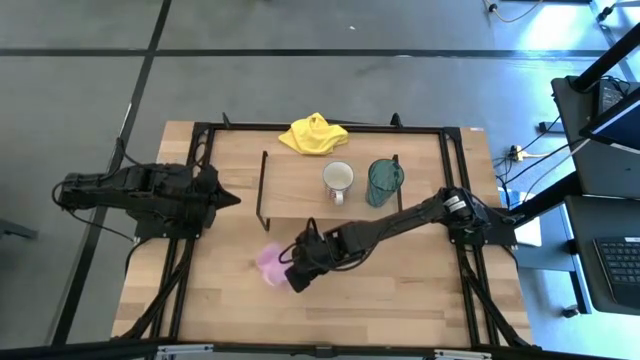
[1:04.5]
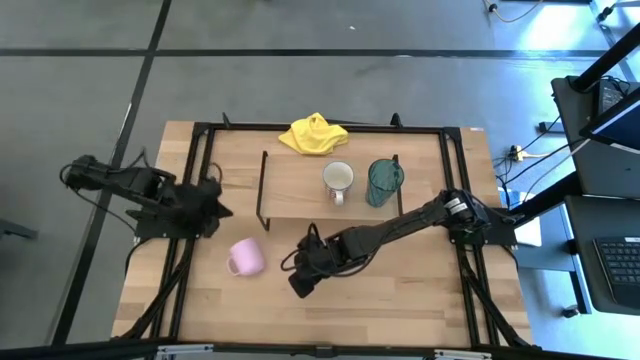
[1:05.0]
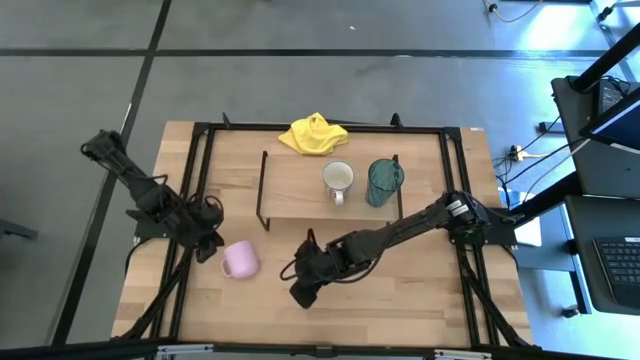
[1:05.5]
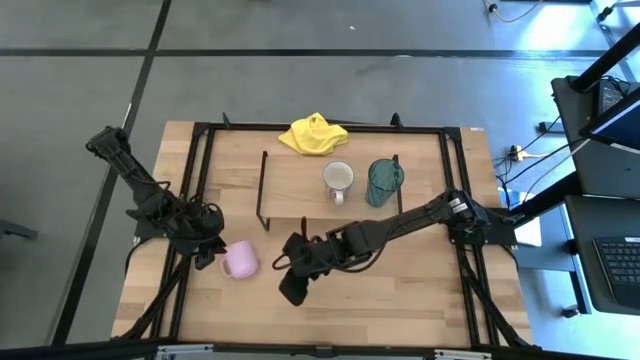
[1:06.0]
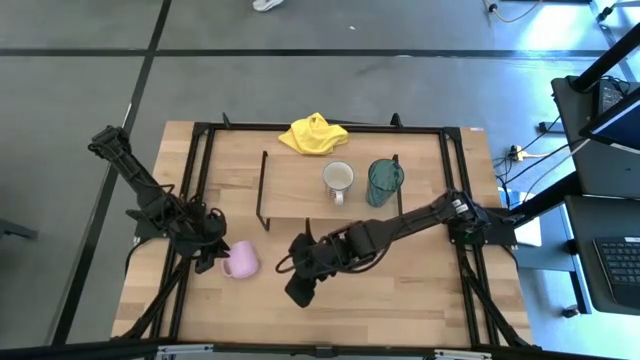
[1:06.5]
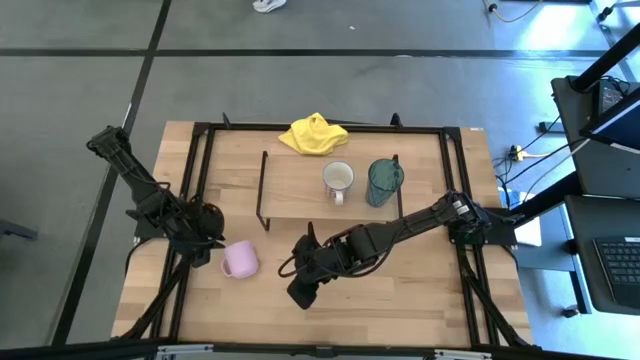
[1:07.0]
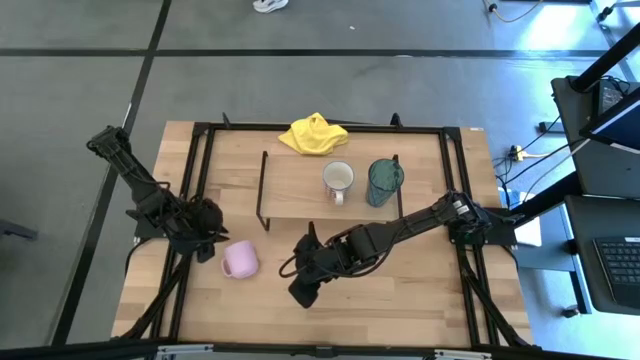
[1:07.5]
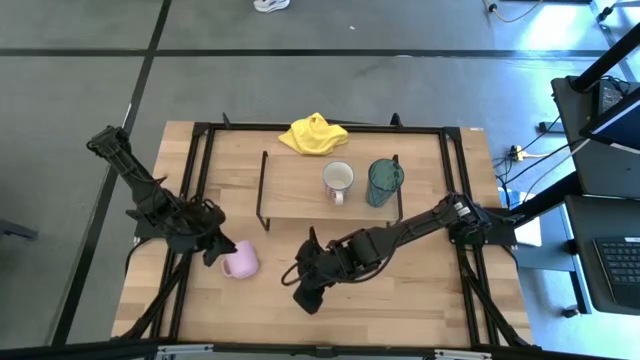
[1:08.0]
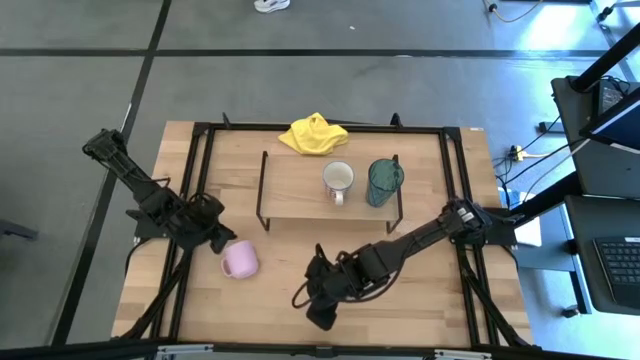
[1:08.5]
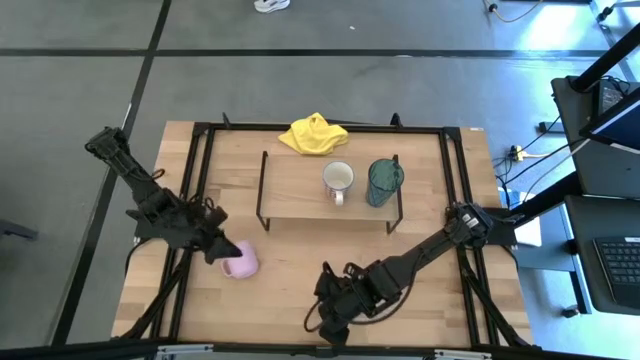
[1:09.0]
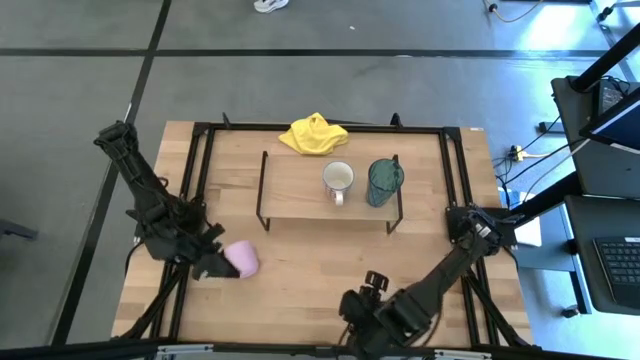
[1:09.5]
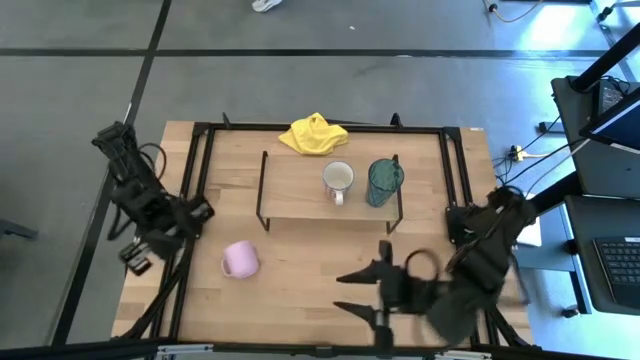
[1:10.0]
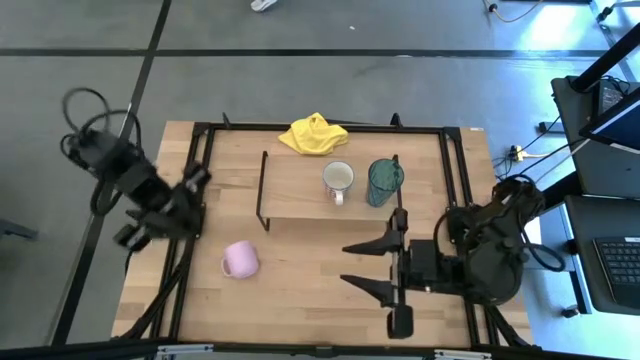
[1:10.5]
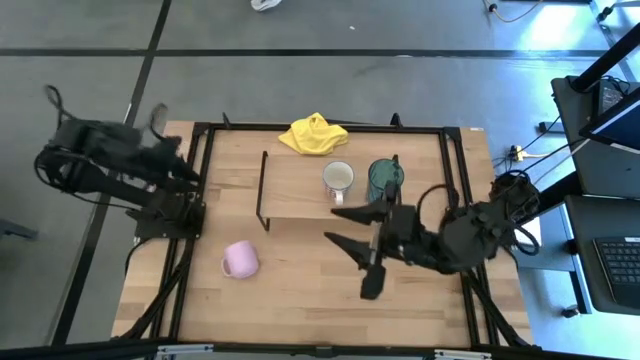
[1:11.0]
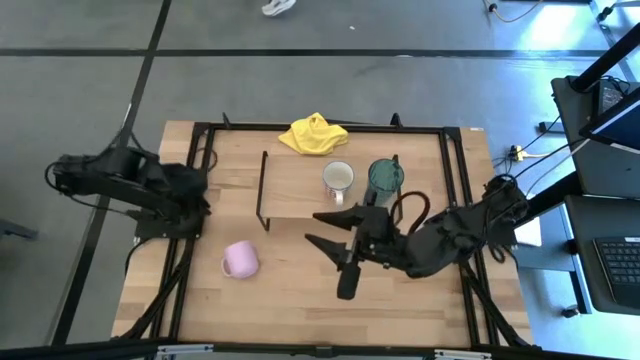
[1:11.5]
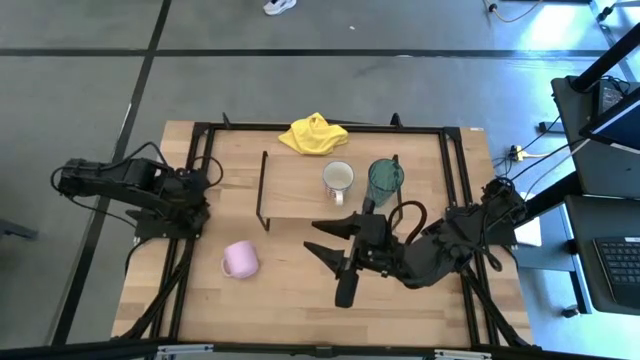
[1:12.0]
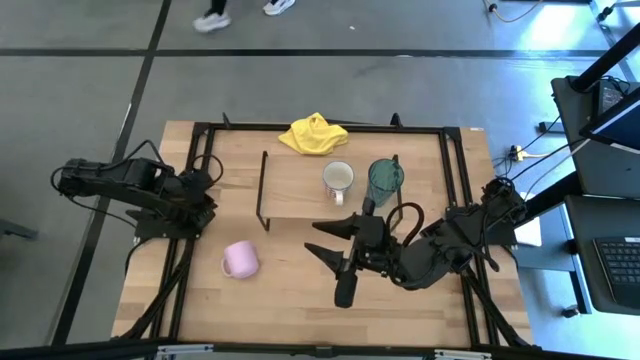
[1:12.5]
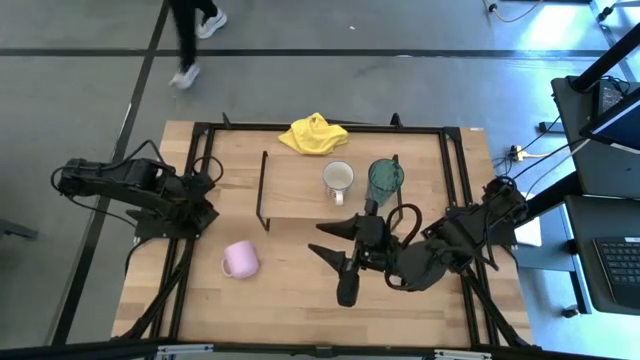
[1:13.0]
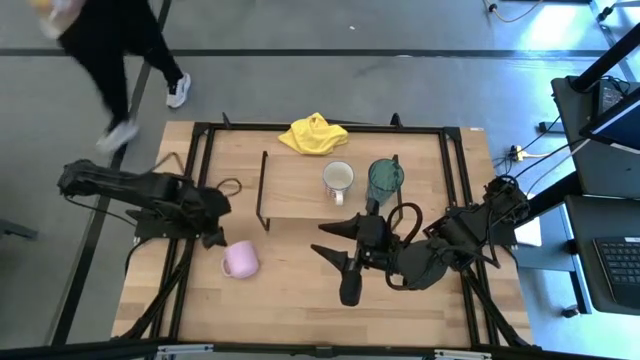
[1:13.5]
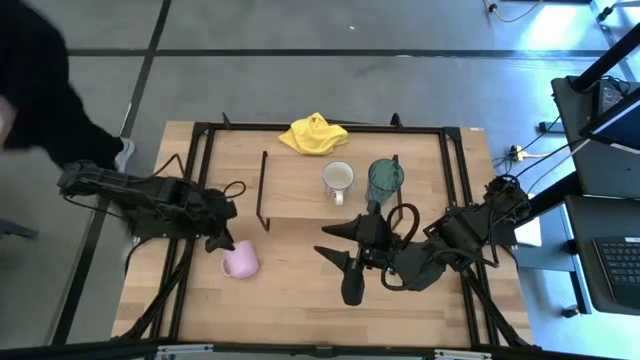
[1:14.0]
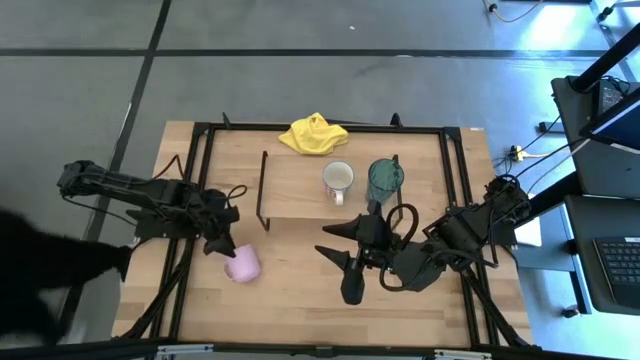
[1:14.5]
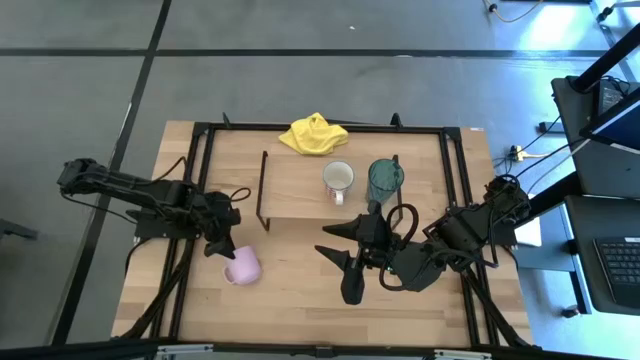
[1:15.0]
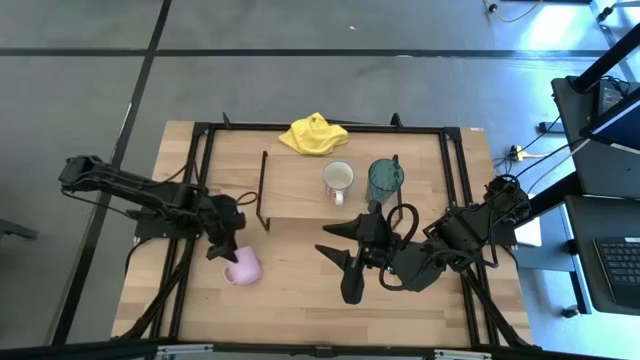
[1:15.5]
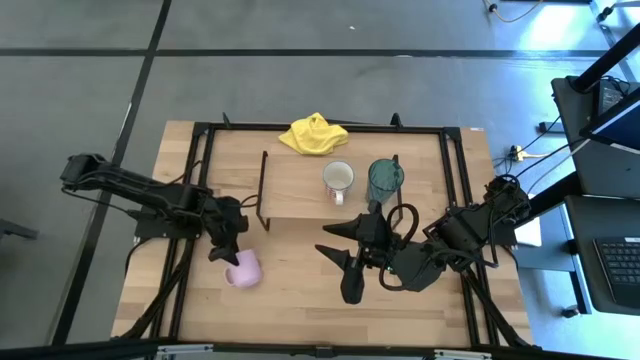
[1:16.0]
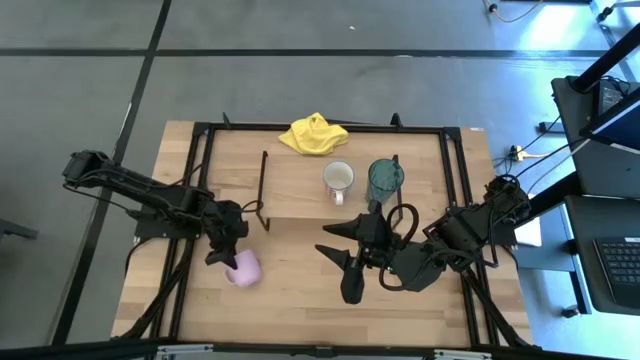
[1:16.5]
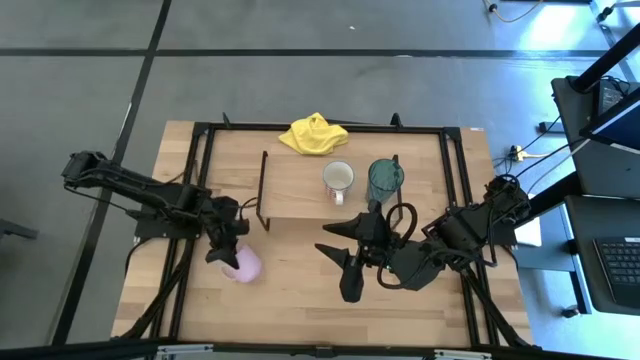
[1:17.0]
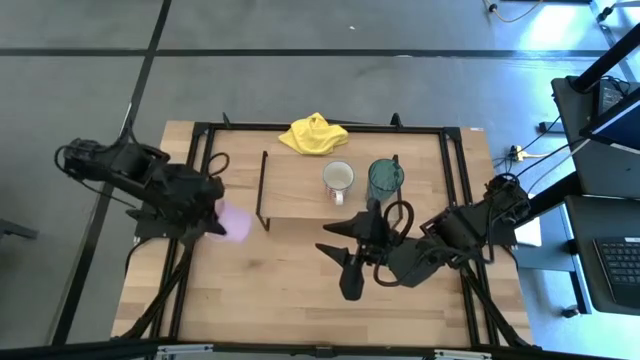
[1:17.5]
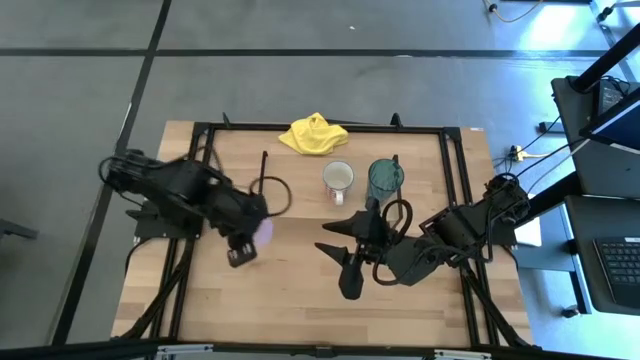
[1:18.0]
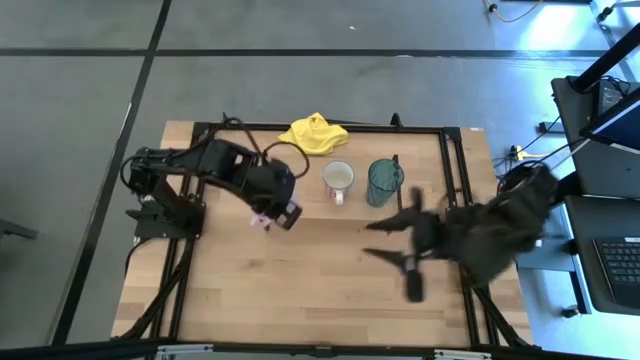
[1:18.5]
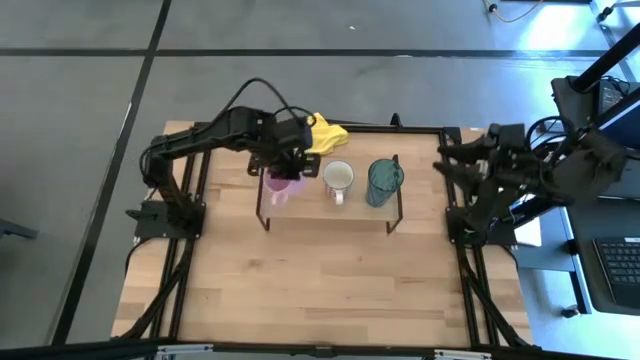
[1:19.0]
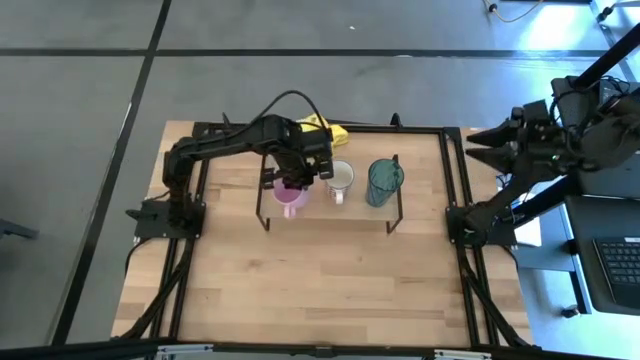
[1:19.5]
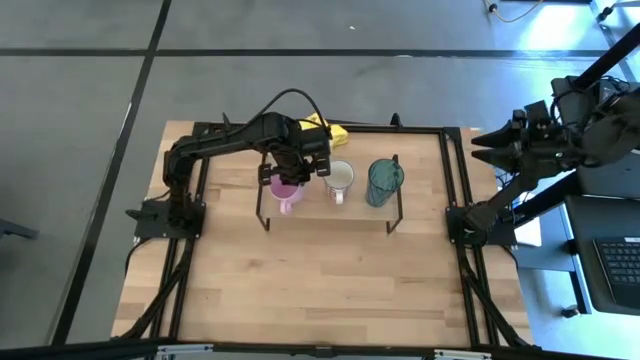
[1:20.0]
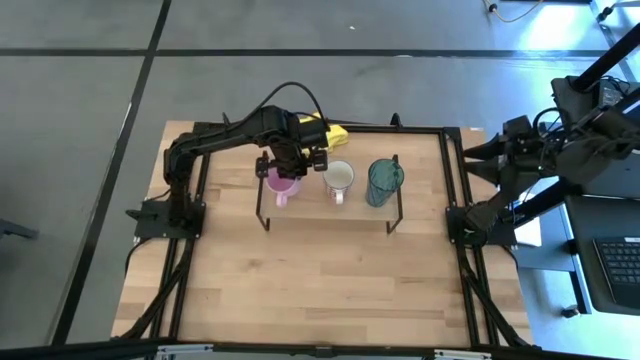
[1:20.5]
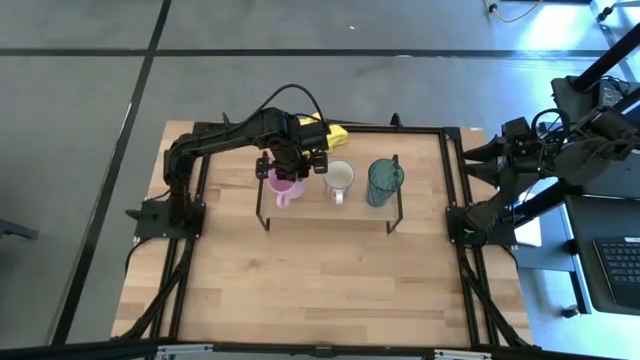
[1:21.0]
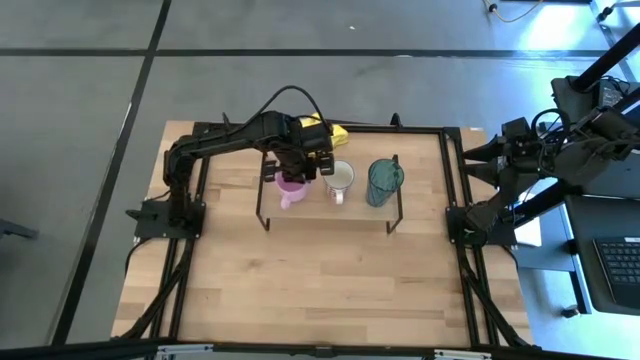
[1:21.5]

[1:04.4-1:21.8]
Task: Stack small to large cups/mugs on shelf
Put the pink mug on the shelf

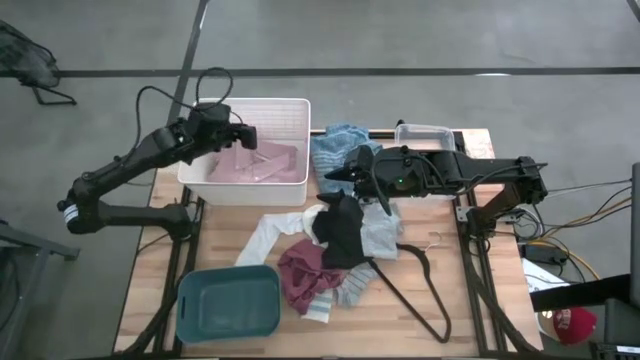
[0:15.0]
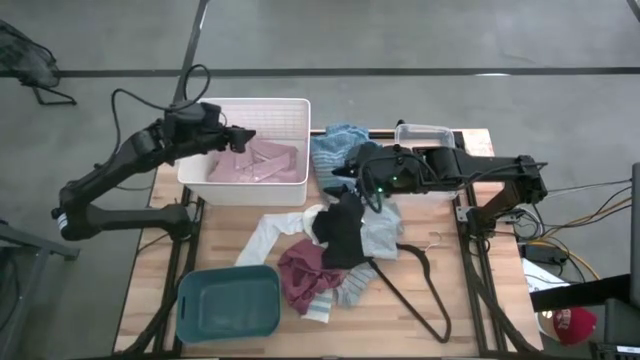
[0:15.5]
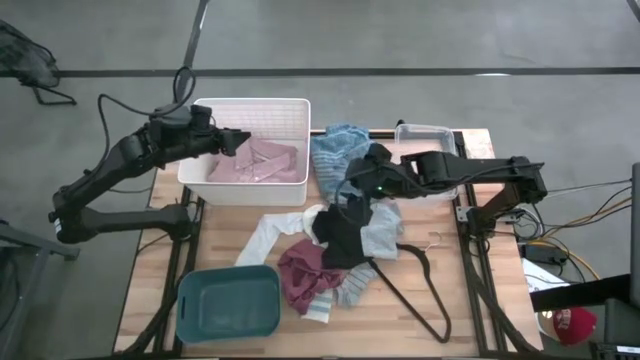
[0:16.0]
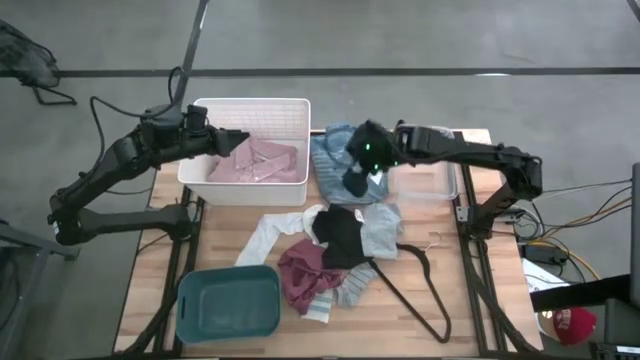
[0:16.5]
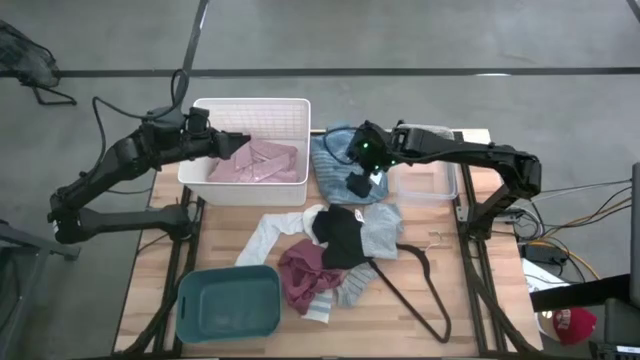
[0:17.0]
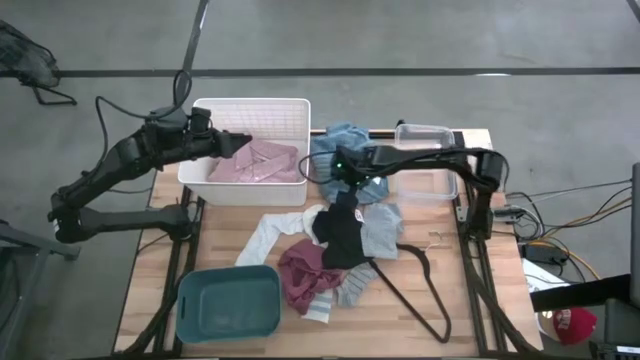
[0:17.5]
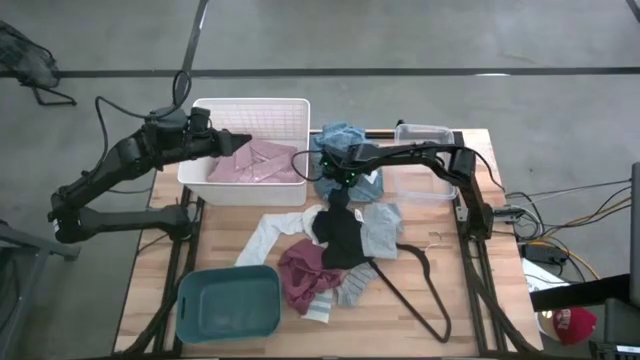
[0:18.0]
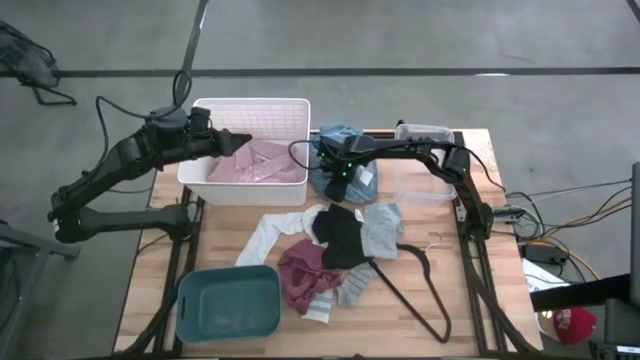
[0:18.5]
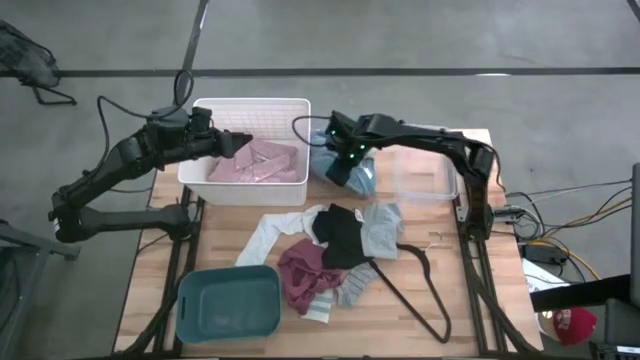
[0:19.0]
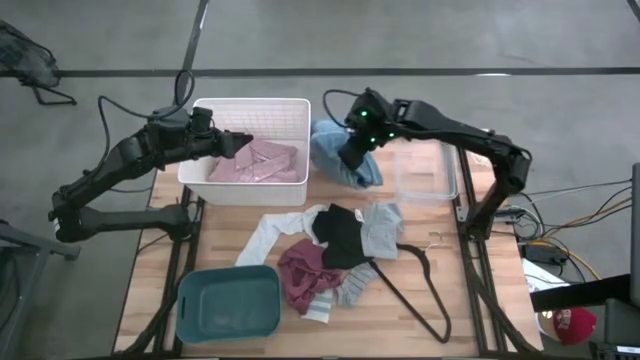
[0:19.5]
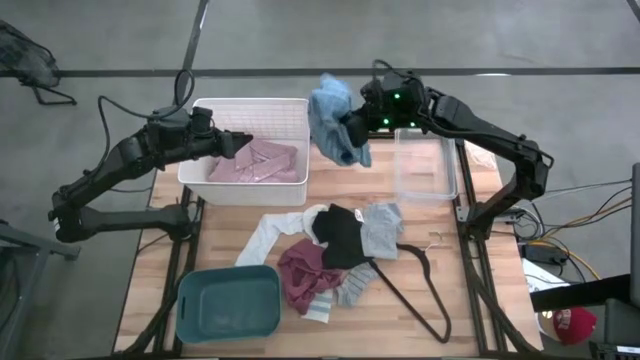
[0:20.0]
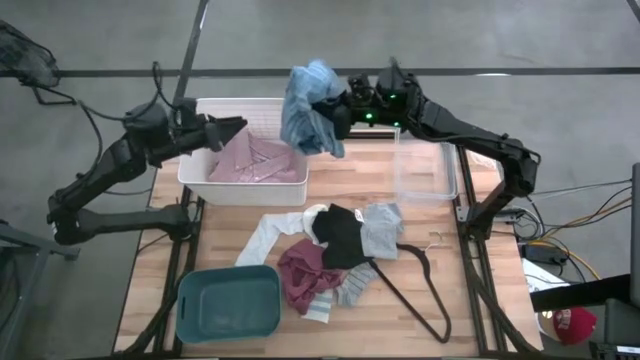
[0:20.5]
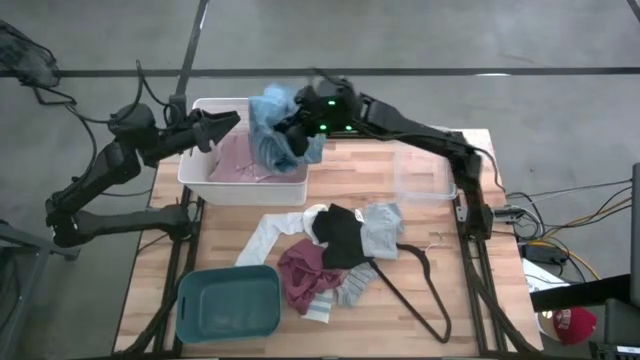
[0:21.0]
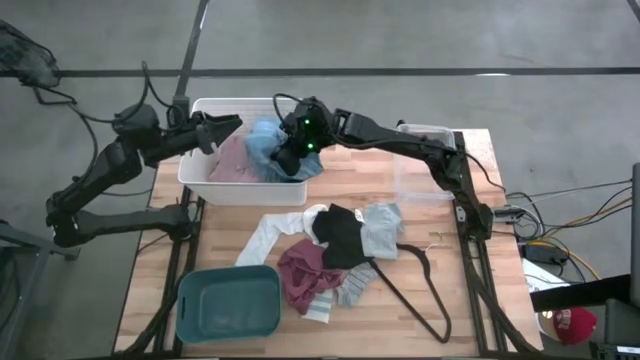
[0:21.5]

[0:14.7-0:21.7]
Task: Pick & Place Cloths
Put the blue polo shirt into the laundry organizer
